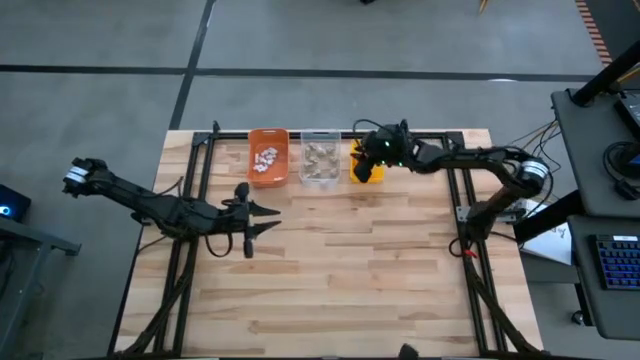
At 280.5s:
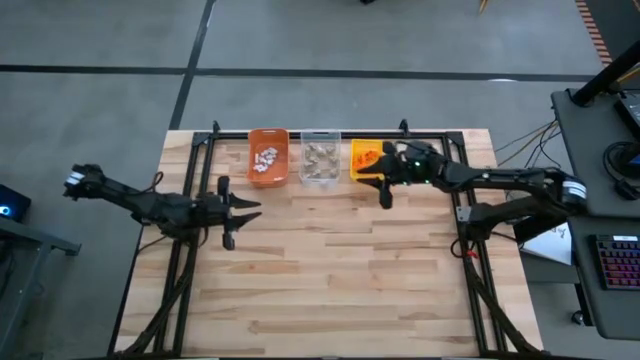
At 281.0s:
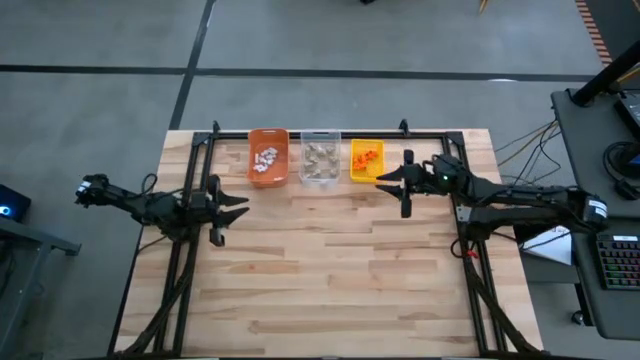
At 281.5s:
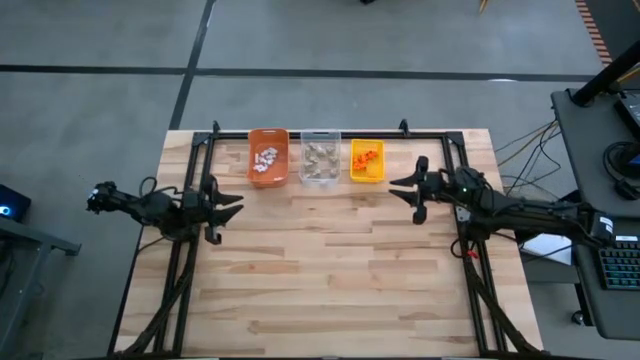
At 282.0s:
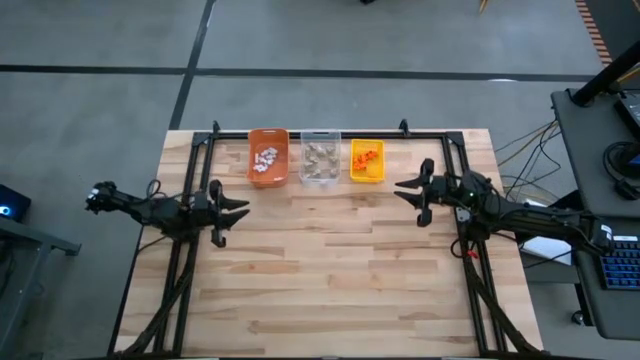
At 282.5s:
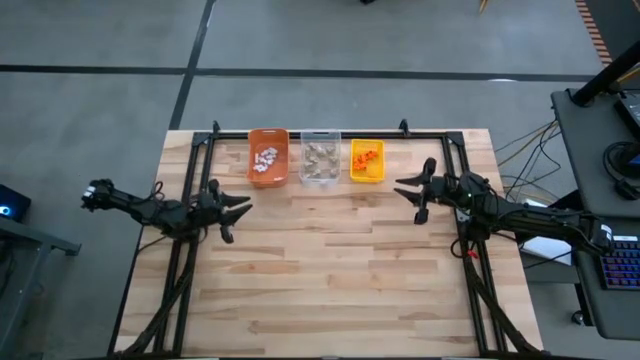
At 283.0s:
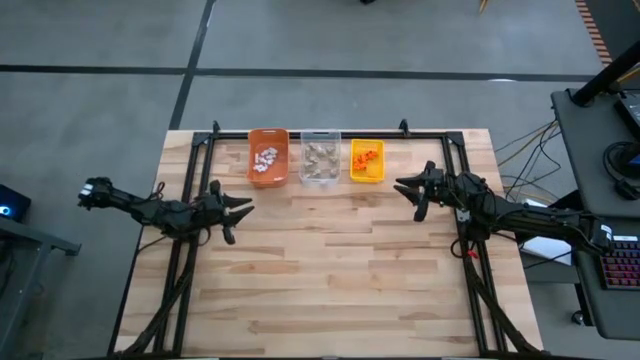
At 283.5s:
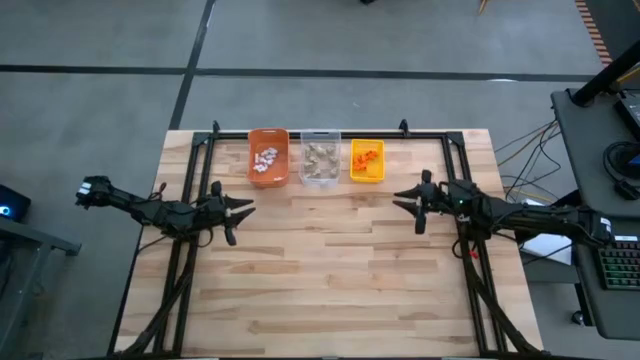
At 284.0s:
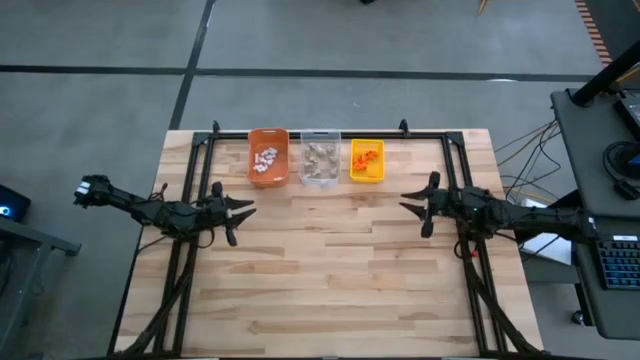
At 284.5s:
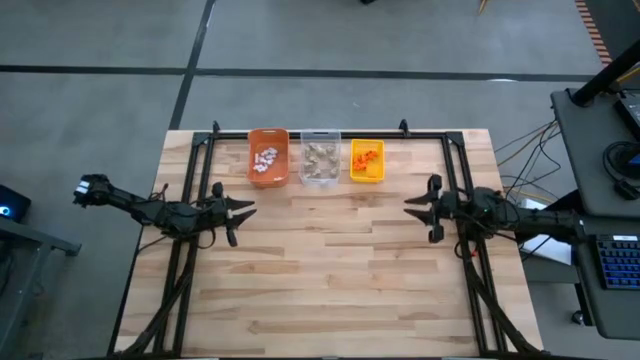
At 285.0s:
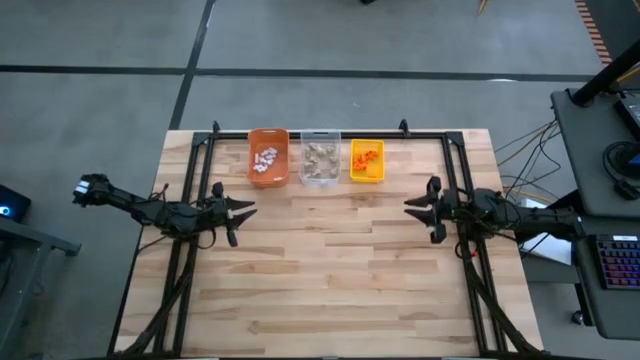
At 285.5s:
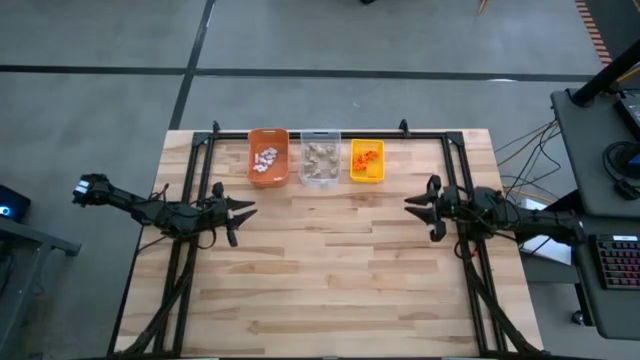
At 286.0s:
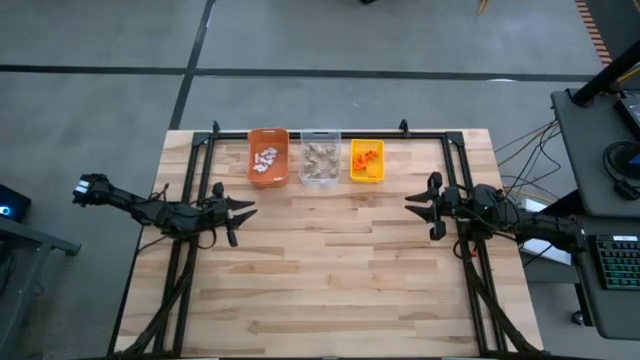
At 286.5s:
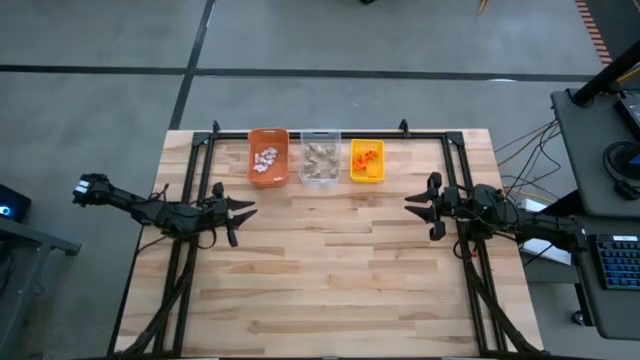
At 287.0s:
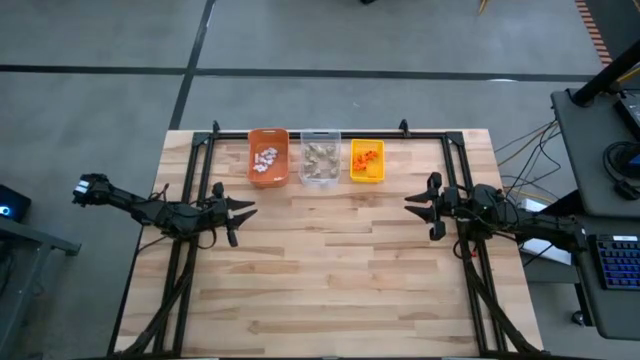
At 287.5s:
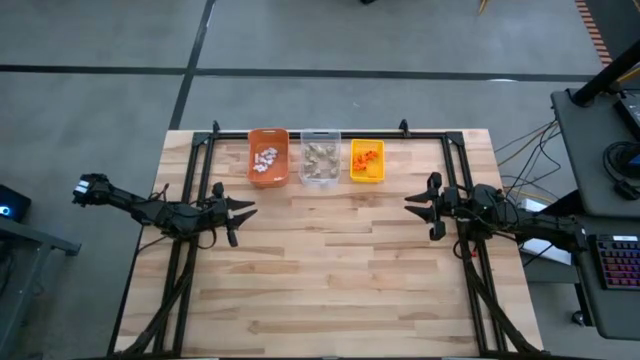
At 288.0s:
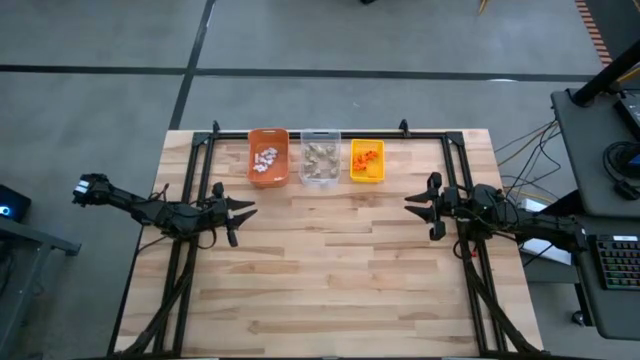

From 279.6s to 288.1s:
Task: Sort Halloween decoration
Return to Home Position

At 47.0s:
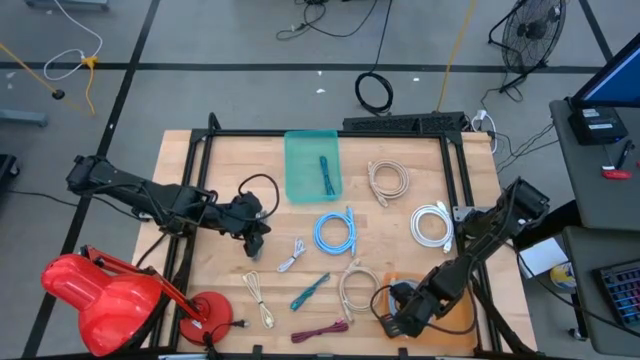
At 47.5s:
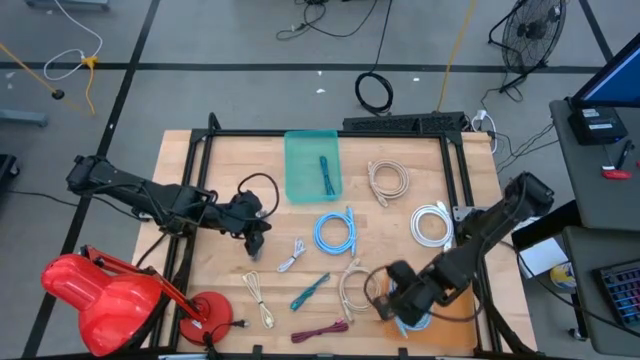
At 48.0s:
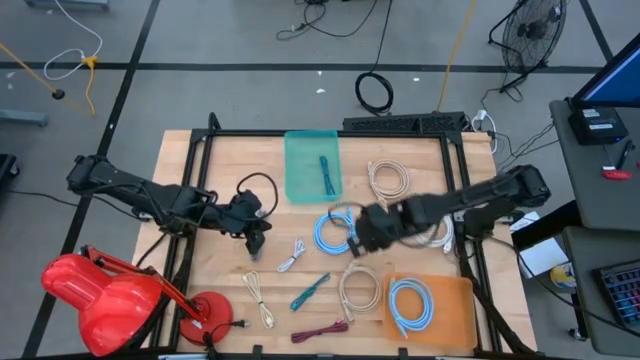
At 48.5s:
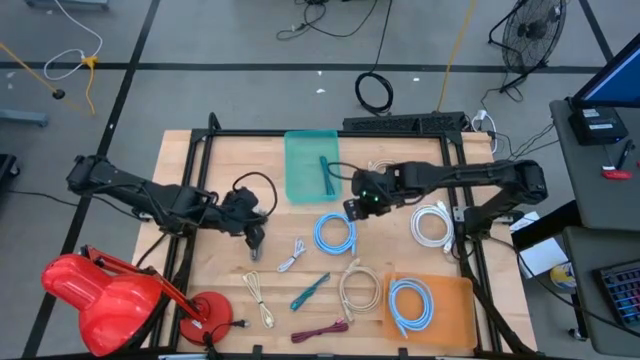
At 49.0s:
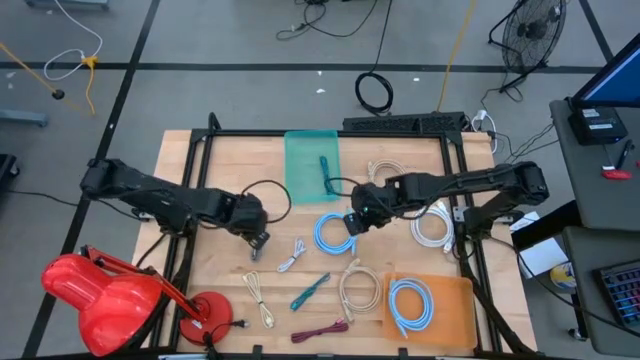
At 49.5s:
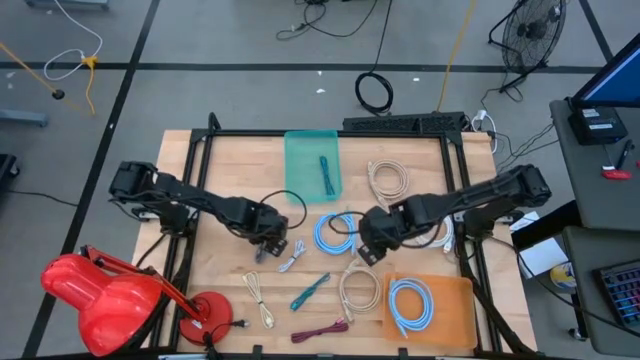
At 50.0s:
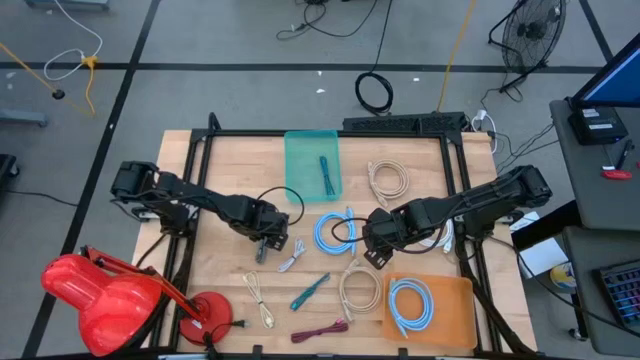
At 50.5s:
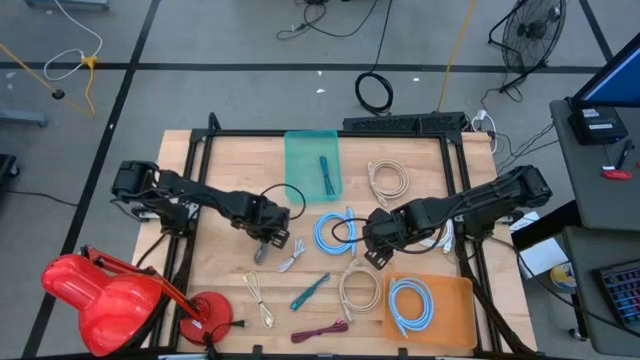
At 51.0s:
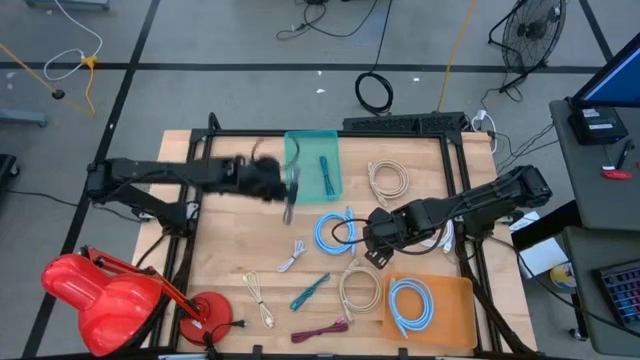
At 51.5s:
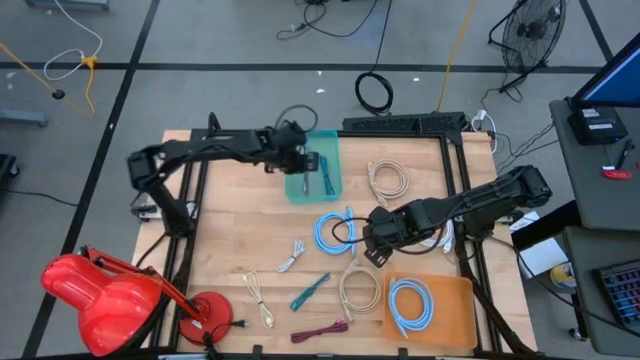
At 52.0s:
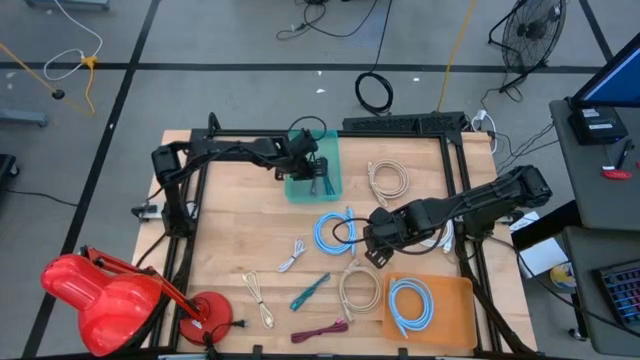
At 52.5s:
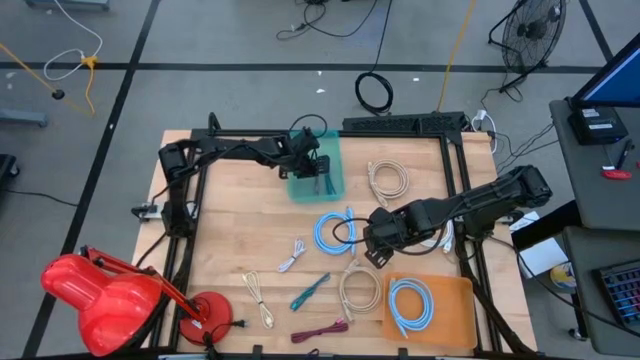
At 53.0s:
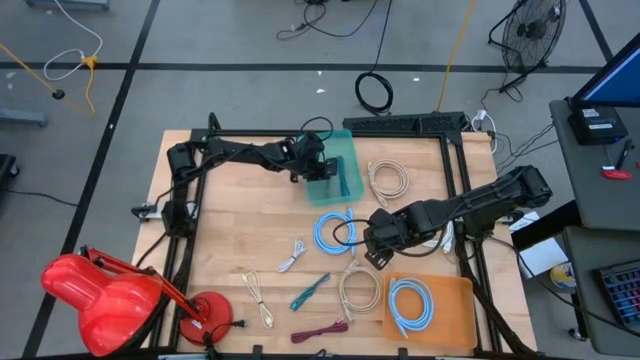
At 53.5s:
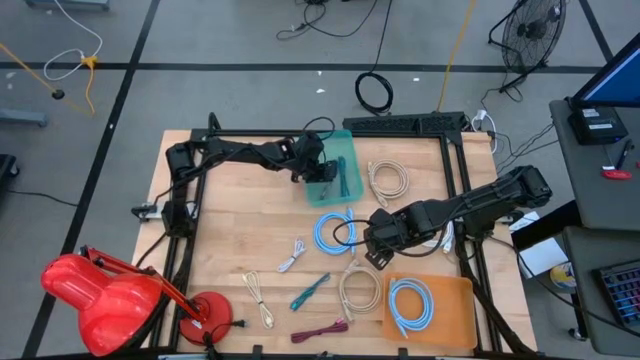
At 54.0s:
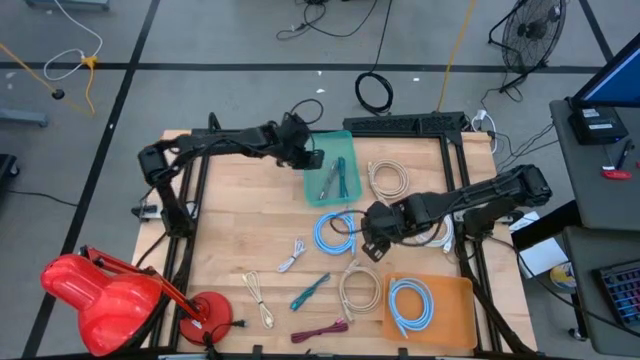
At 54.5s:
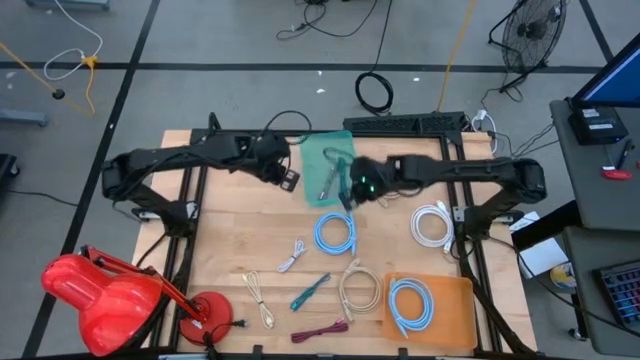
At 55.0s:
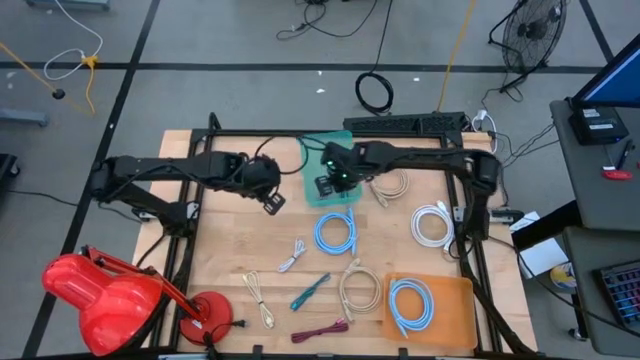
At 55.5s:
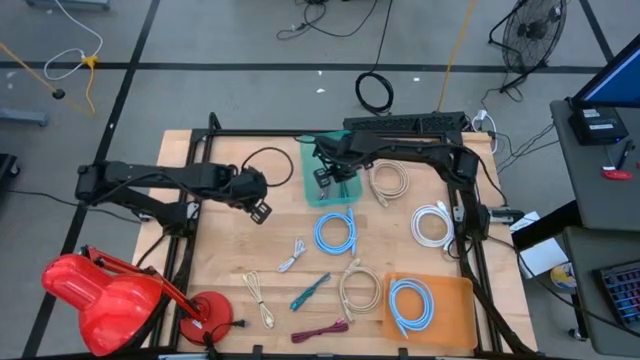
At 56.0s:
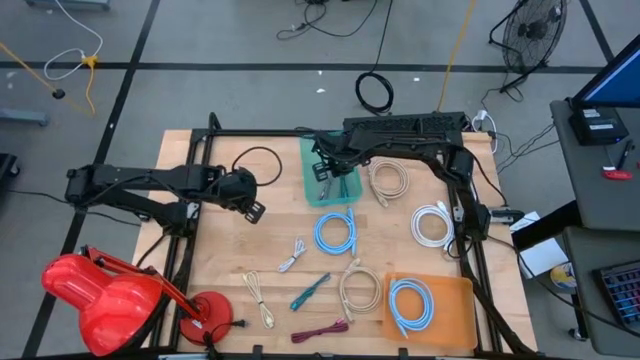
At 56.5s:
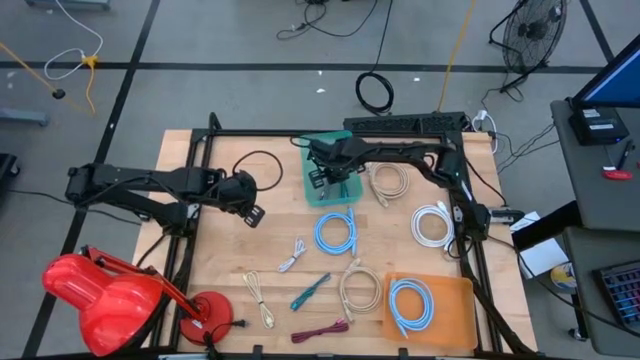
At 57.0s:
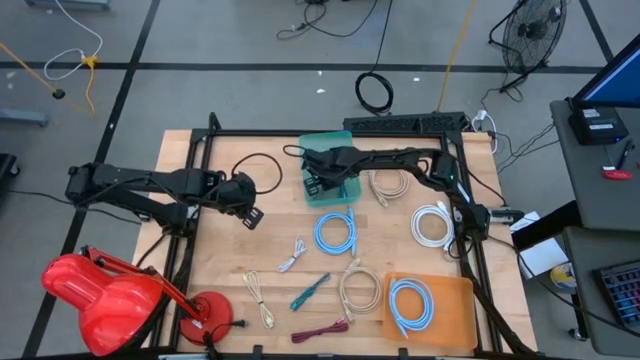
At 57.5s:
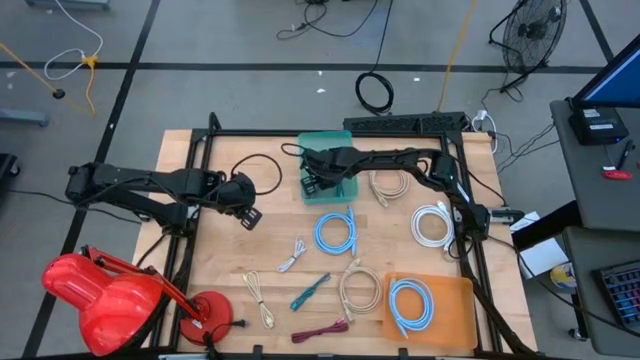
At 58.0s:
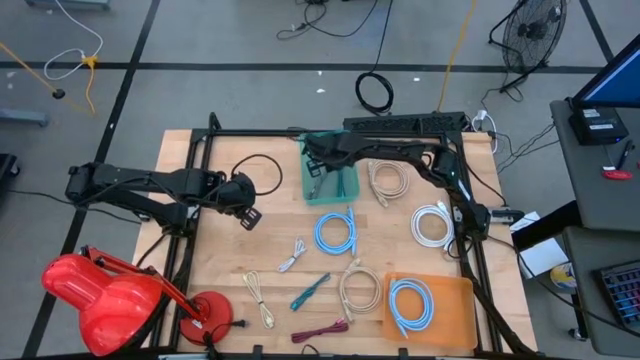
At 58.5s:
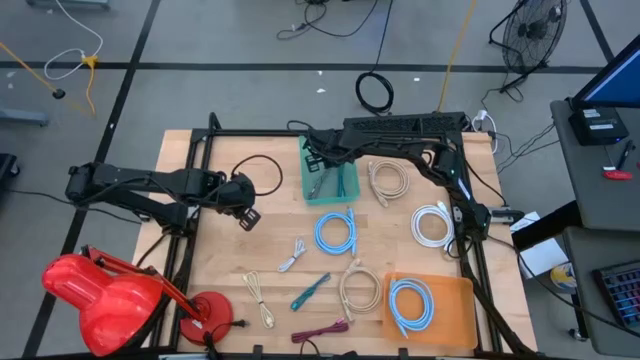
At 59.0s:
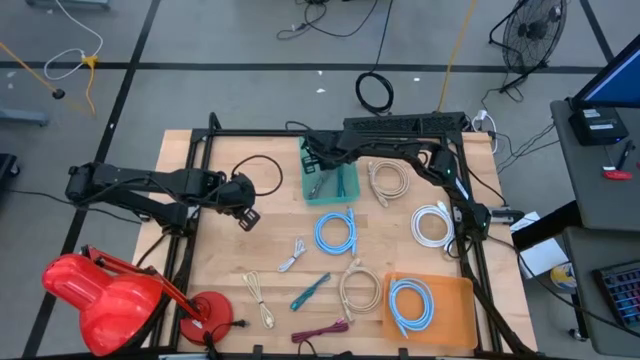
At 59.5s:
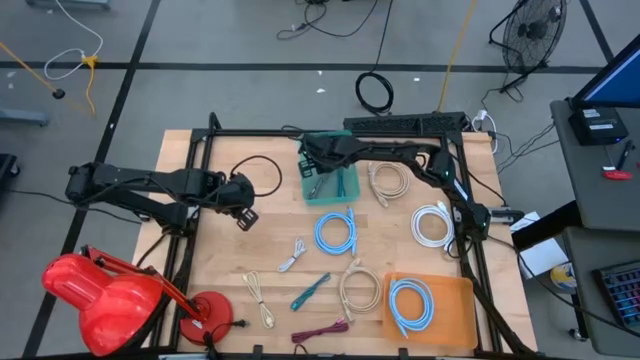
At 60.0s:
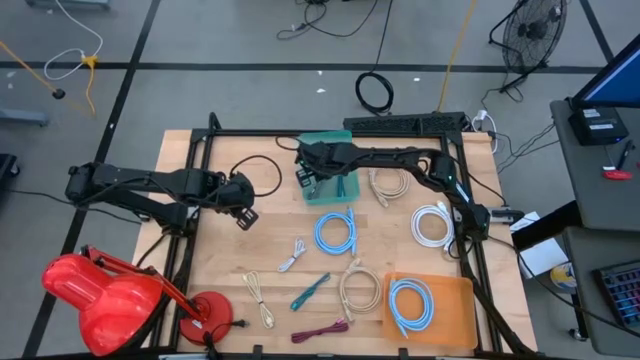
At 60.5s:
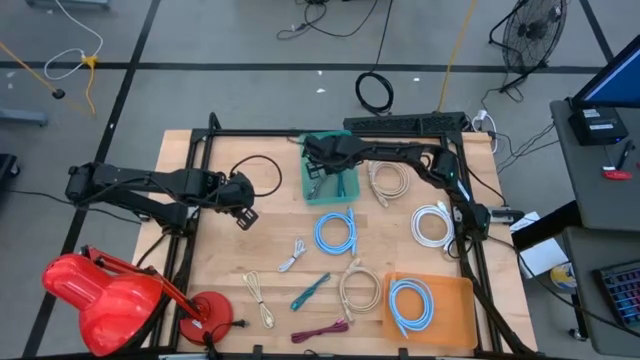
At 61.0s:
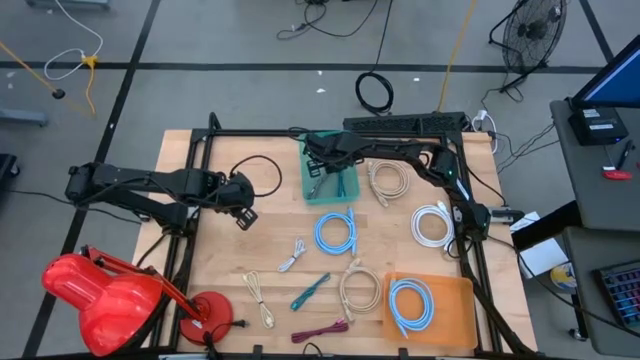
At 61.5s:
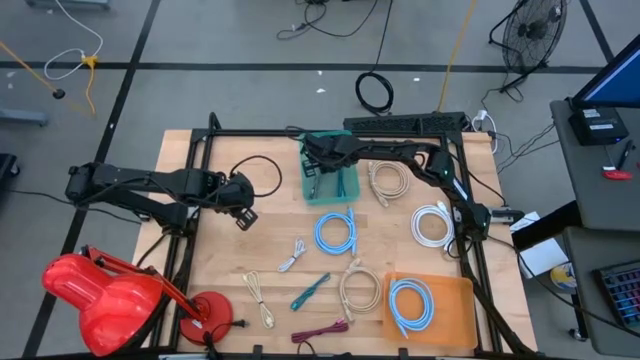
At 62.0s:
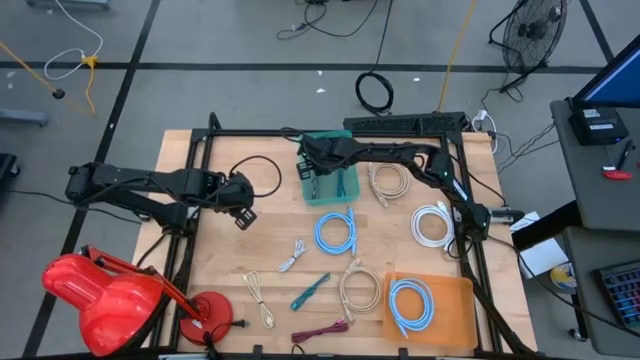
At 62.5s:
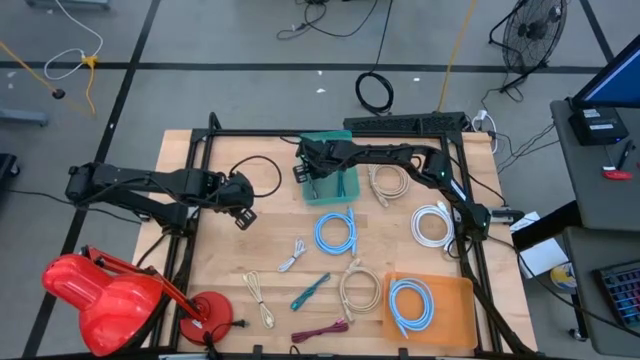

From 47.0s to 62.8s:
Task: Pick & Place USB Port
Put the black charger cable into the blue bin
